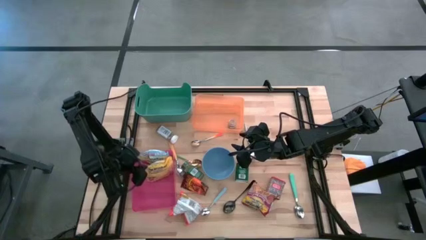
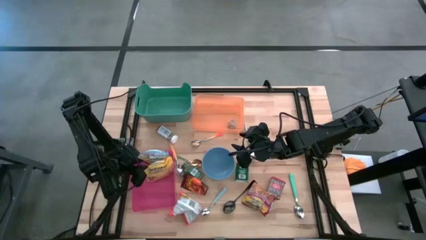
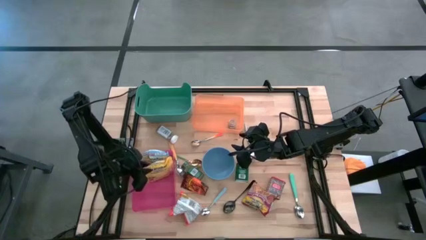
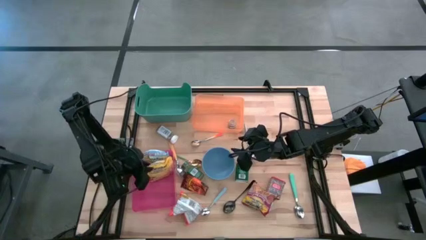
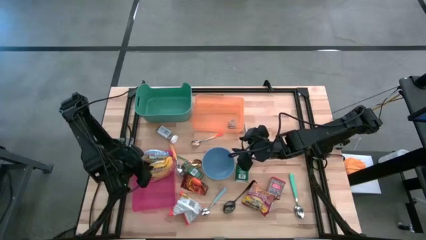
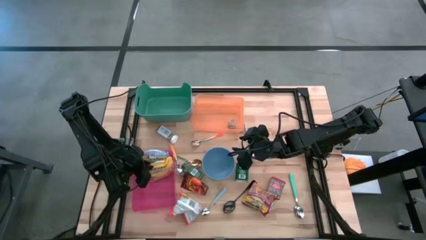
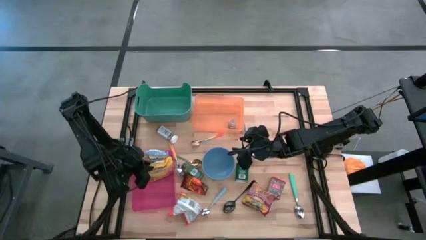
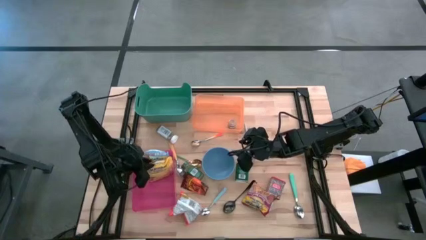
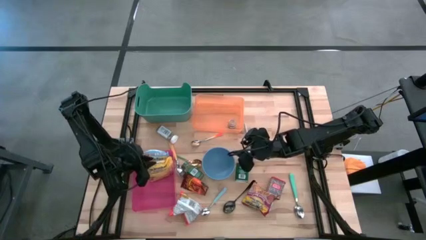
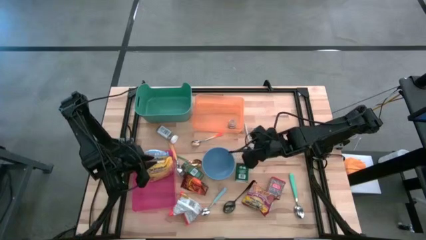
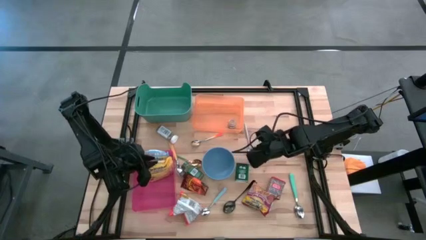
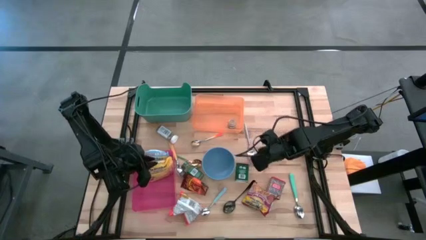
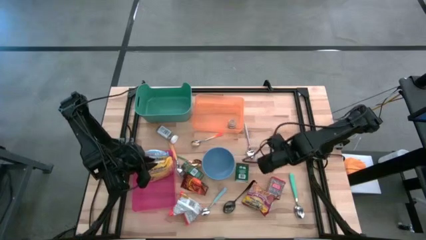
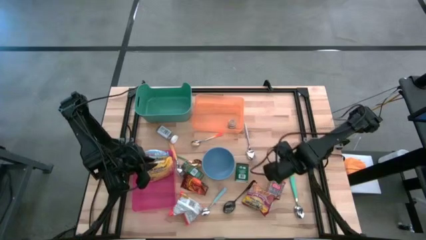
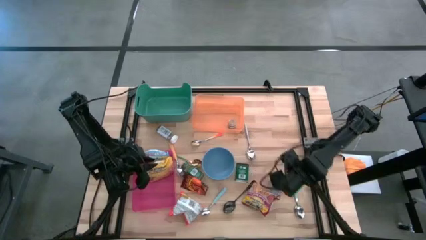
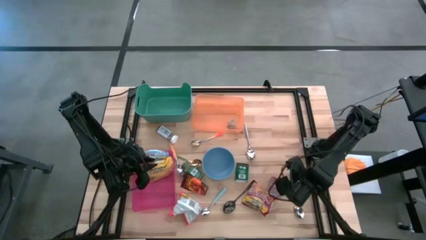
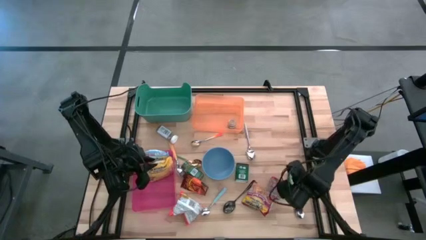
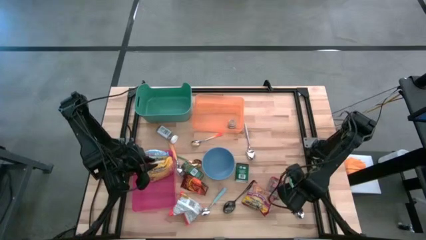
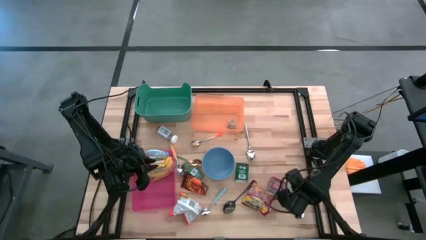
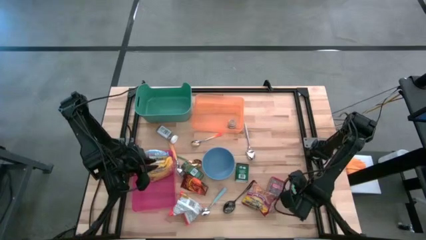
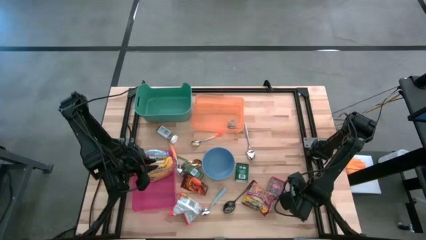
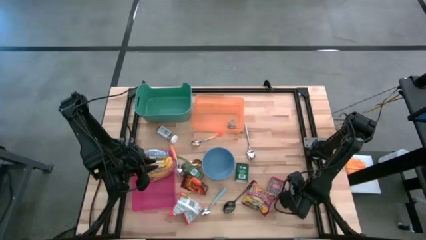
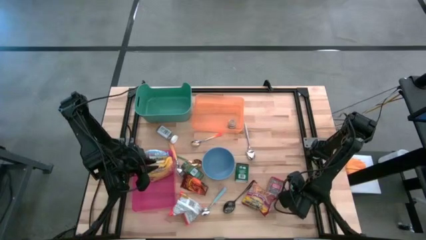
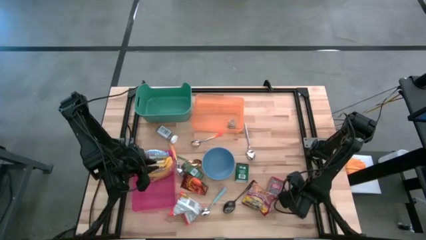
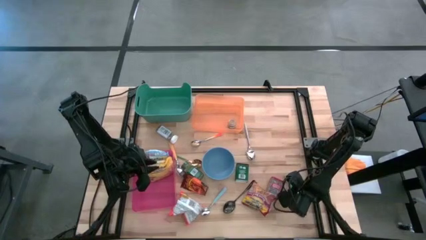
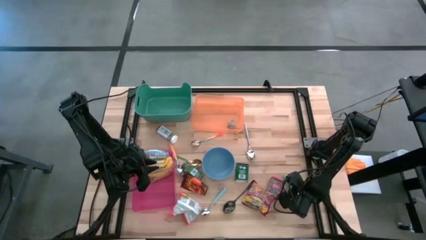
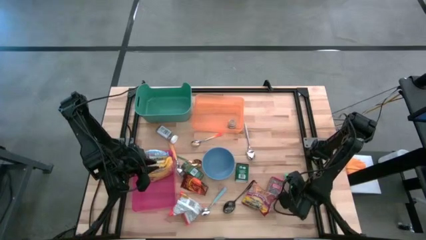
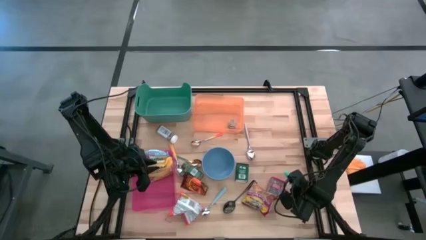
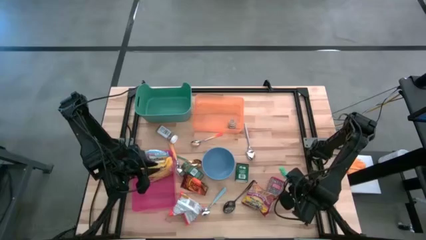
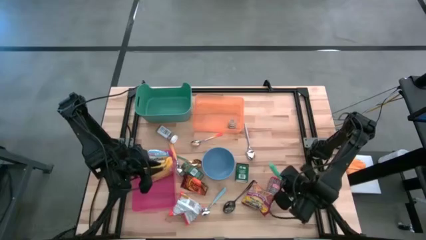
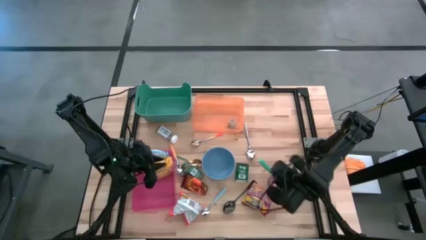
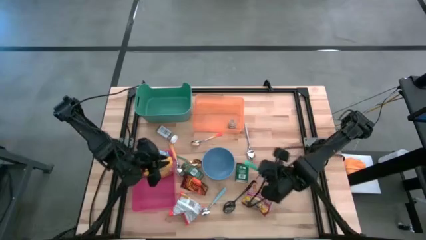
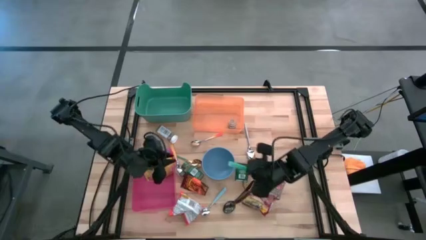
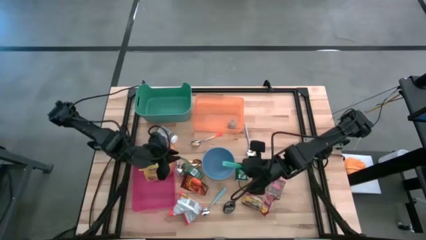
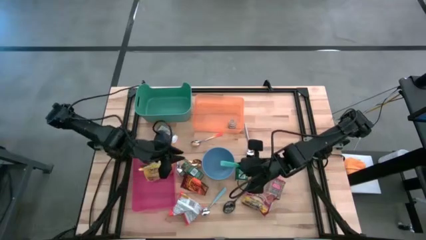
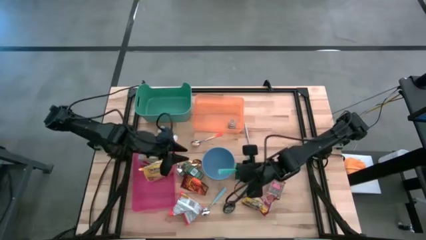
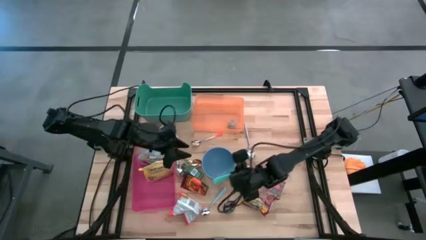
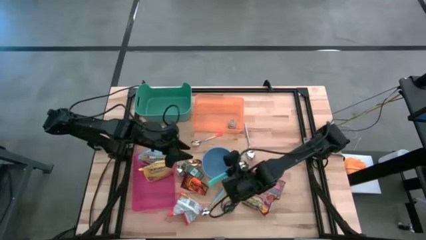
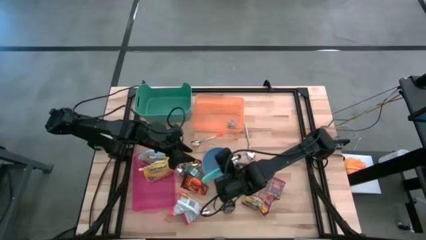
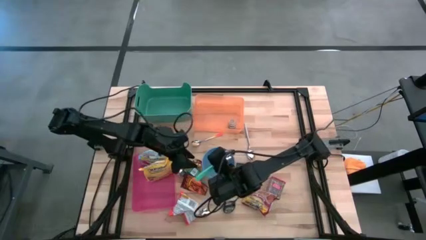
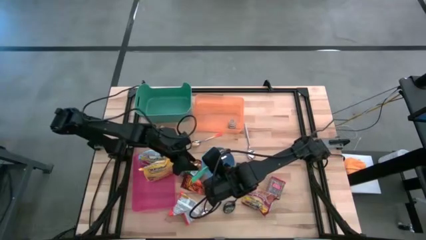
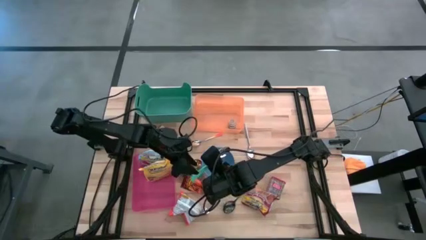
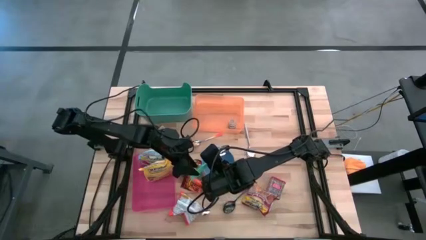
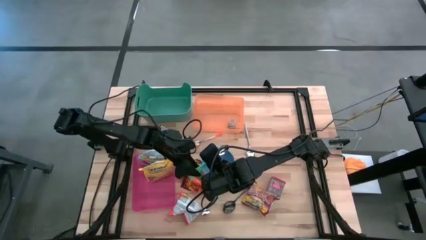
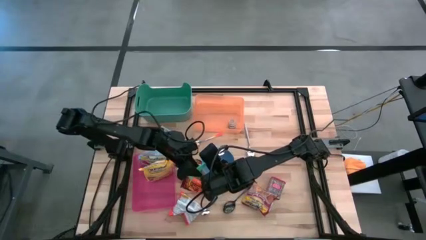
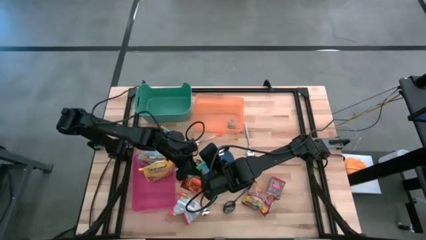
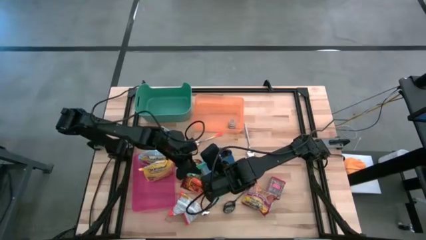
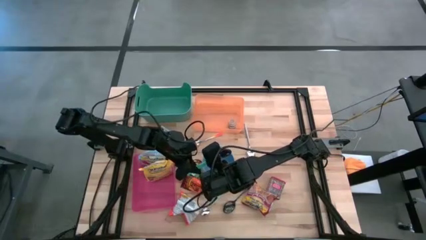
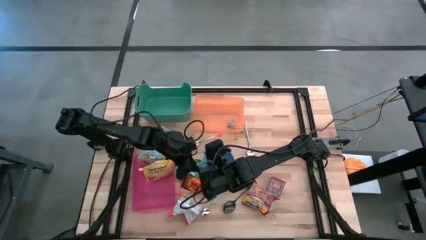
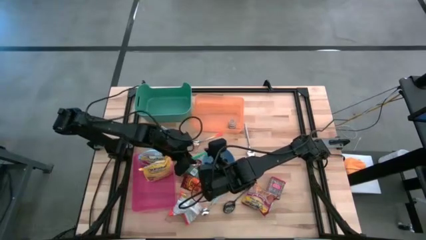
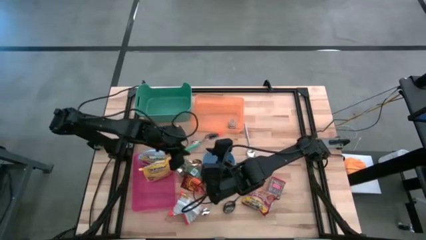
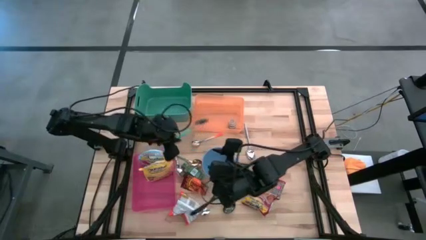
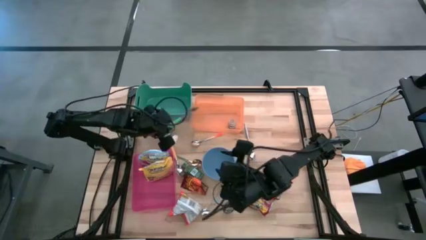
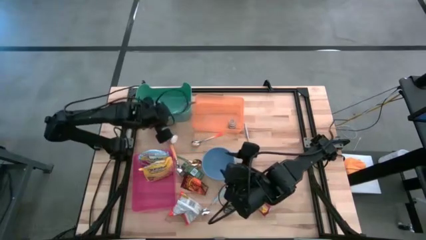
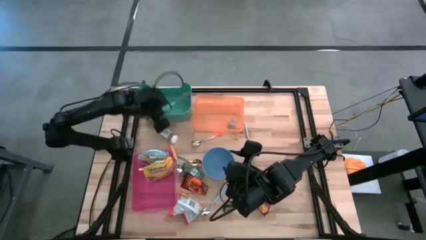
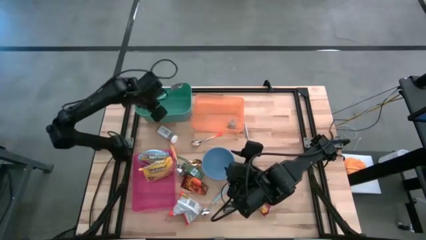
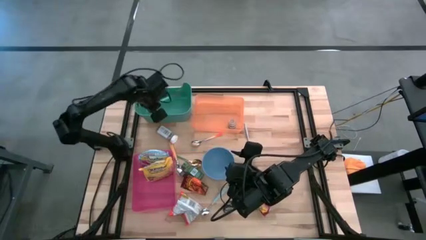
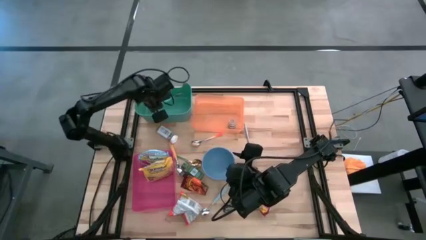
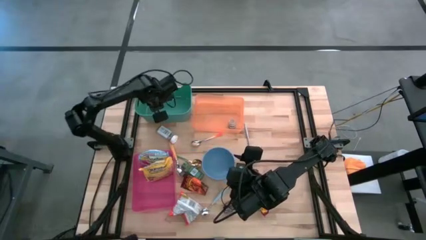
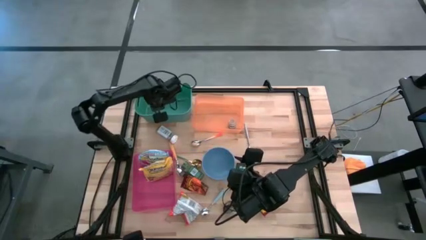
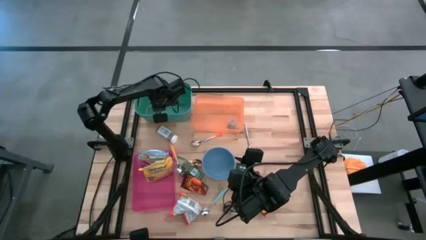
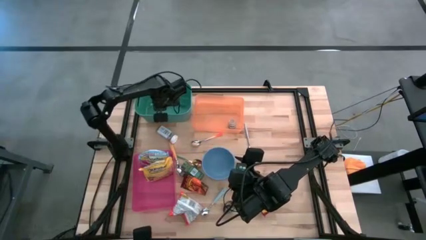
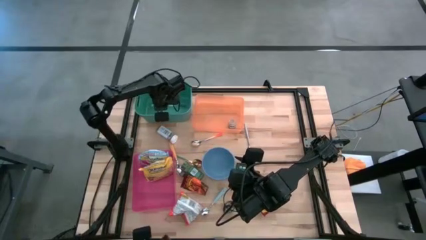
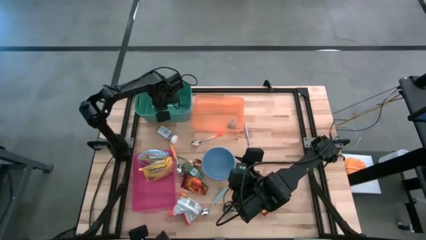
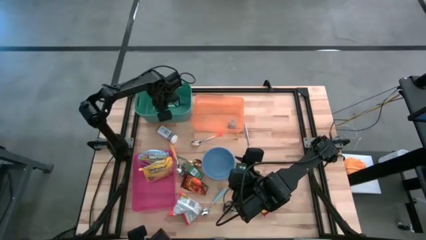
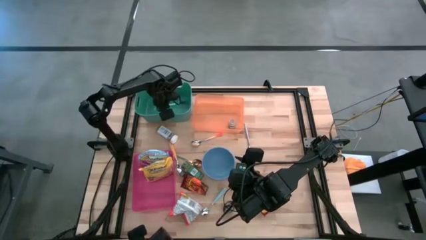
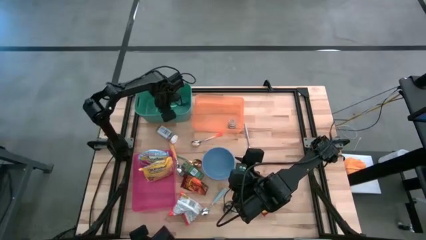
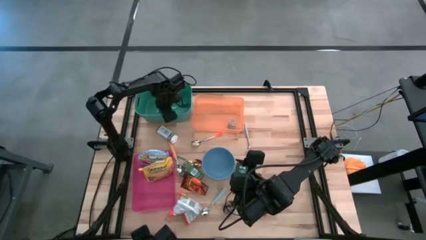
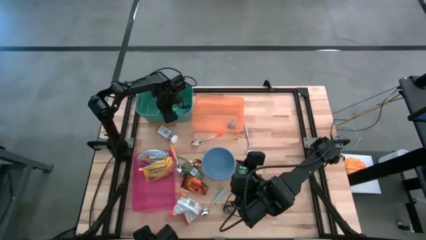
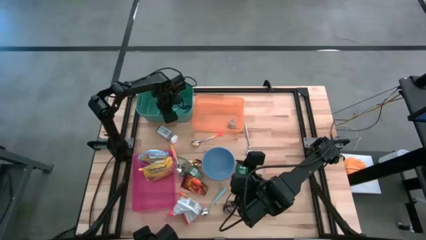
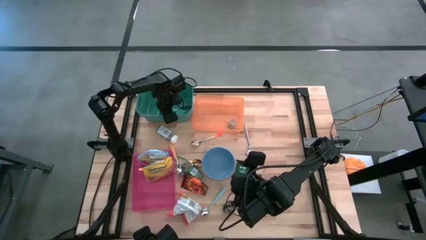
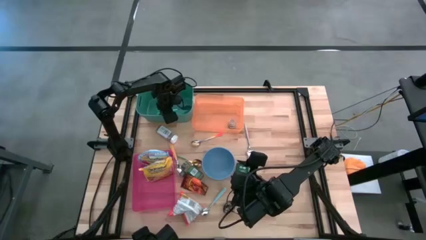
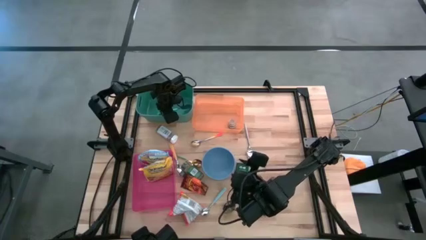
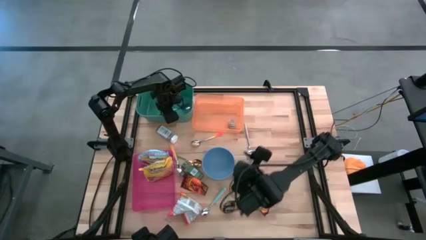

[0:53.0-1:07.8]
Put the blue spoon into the green bin
